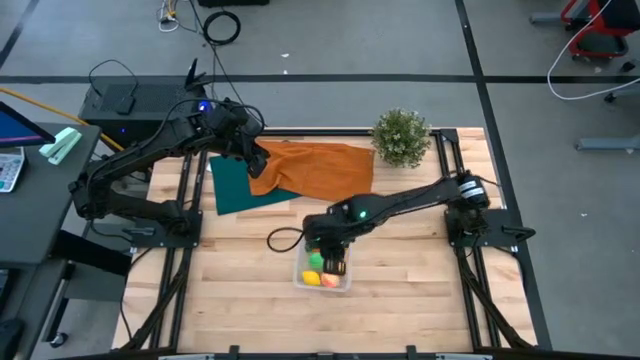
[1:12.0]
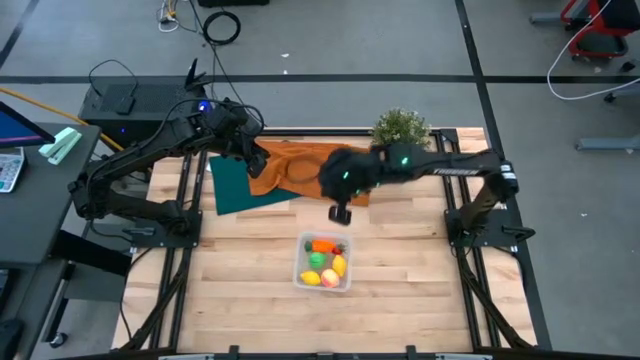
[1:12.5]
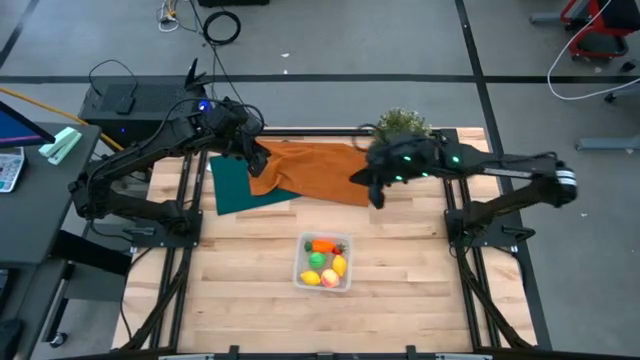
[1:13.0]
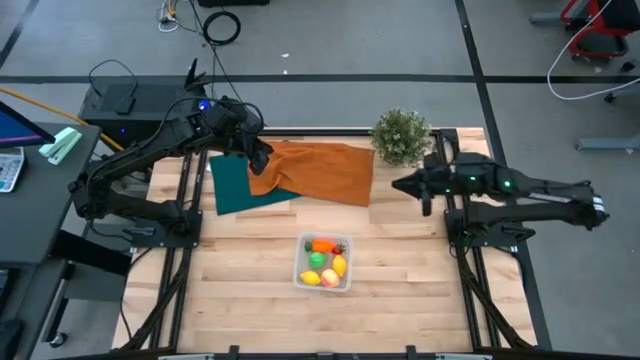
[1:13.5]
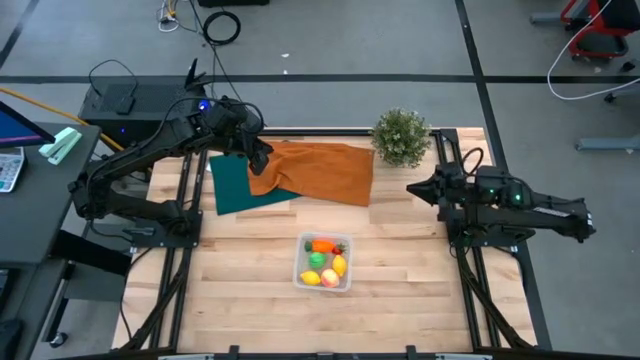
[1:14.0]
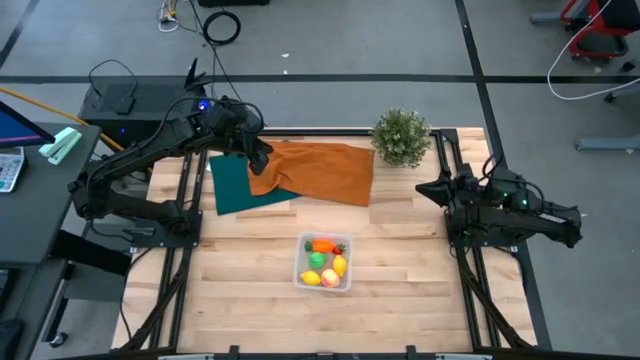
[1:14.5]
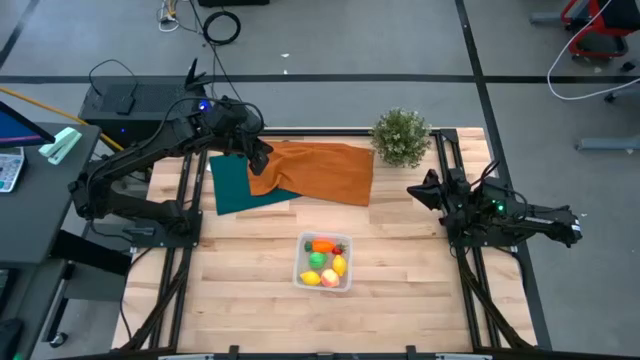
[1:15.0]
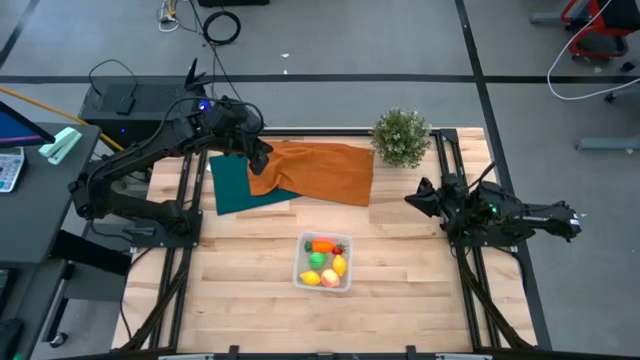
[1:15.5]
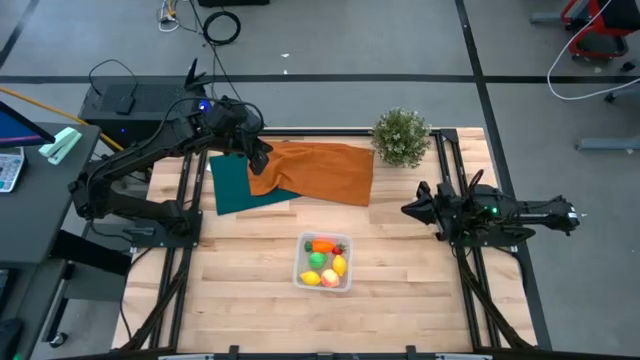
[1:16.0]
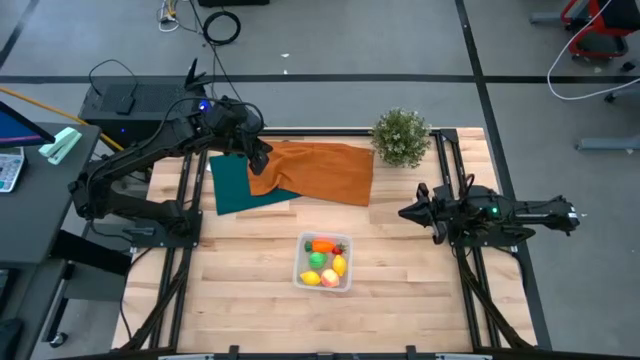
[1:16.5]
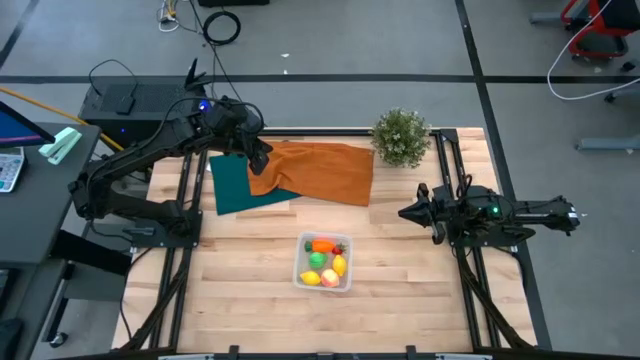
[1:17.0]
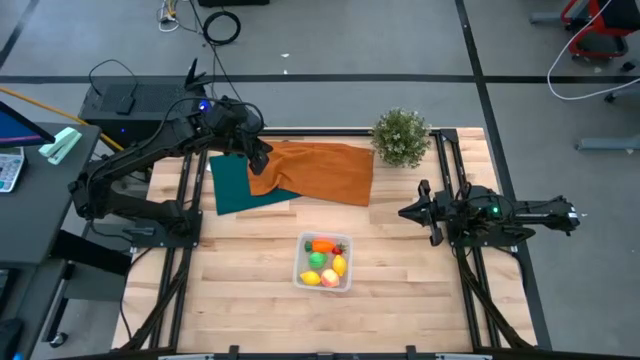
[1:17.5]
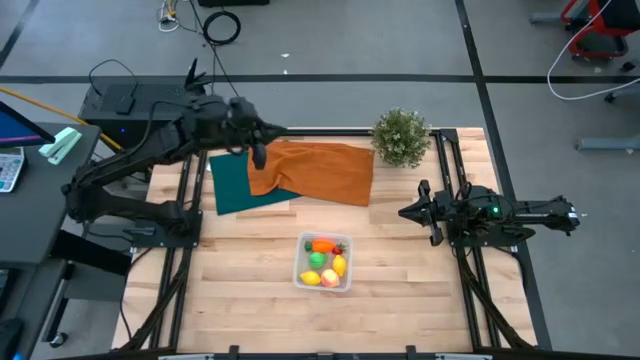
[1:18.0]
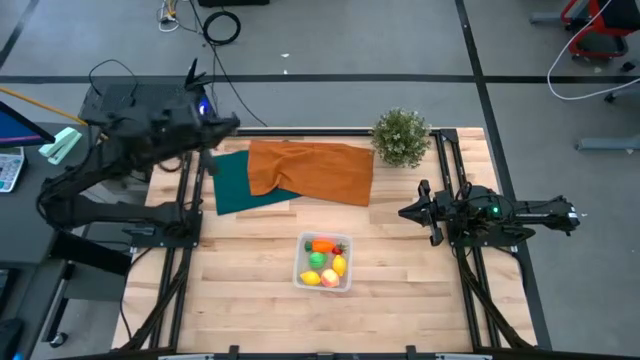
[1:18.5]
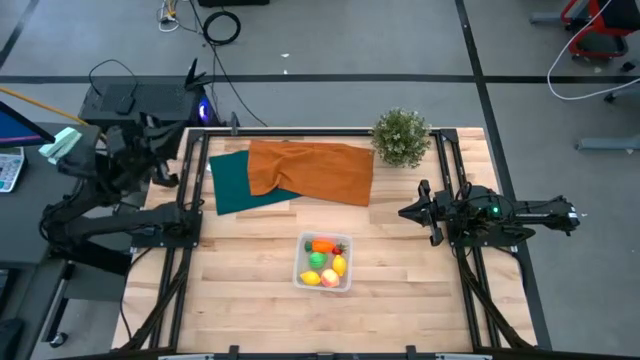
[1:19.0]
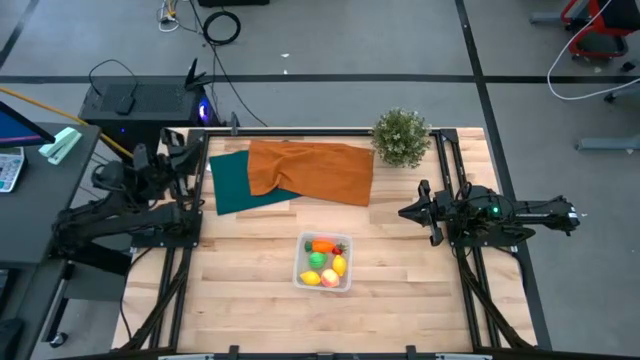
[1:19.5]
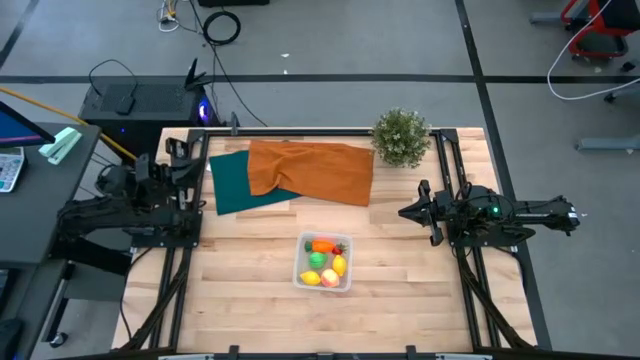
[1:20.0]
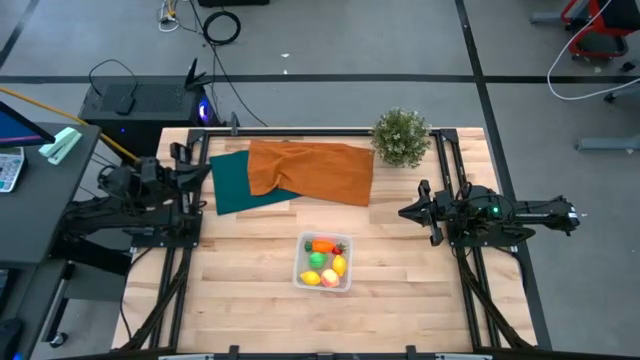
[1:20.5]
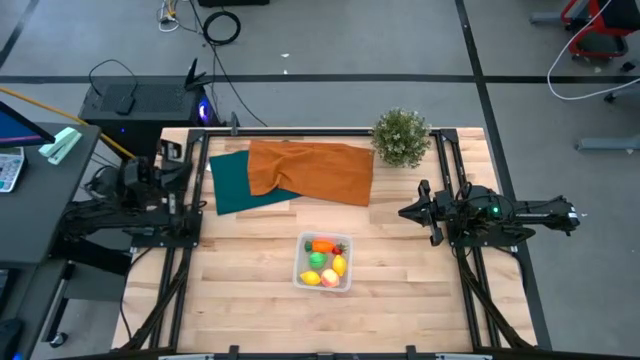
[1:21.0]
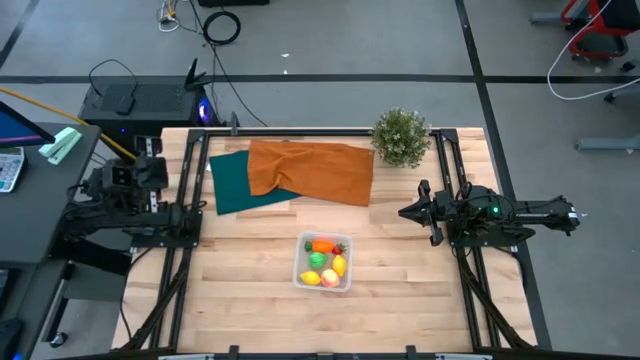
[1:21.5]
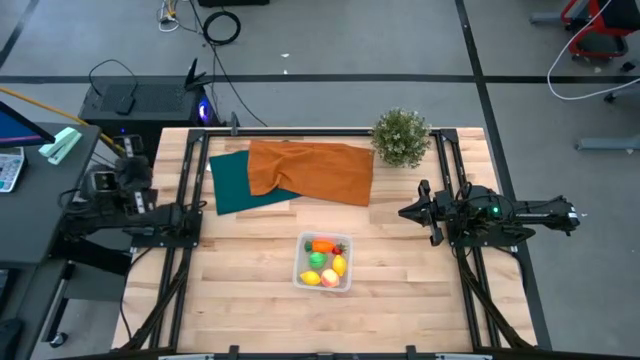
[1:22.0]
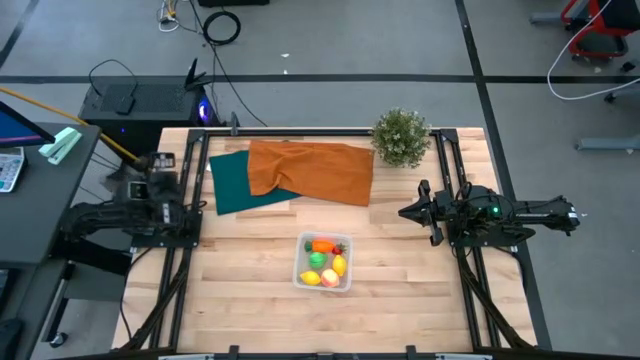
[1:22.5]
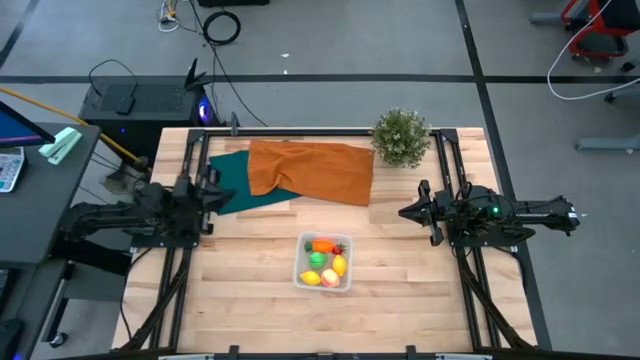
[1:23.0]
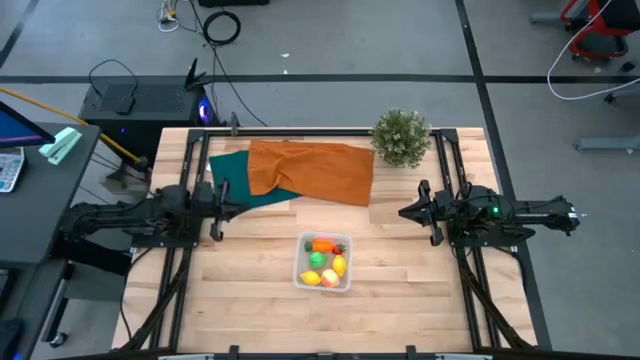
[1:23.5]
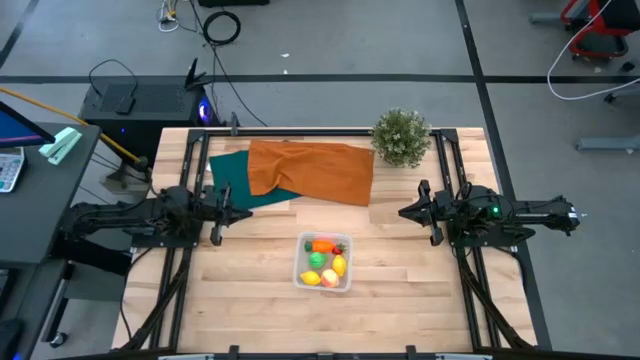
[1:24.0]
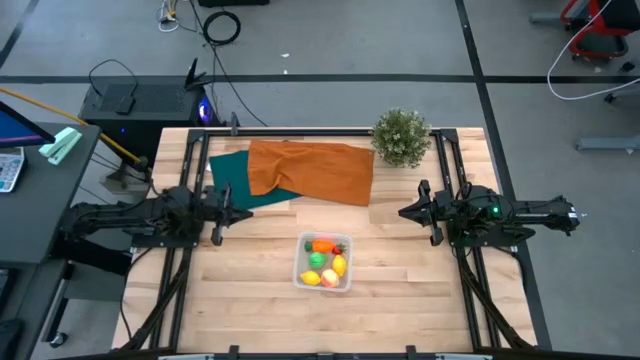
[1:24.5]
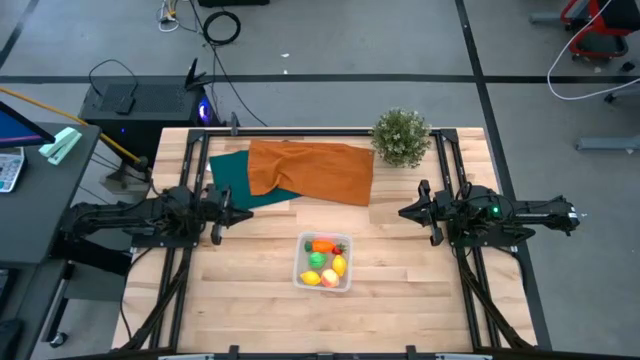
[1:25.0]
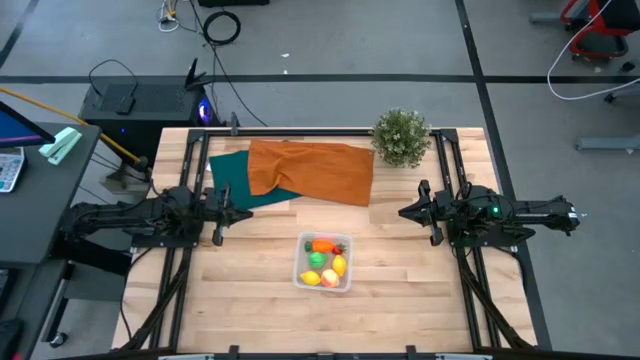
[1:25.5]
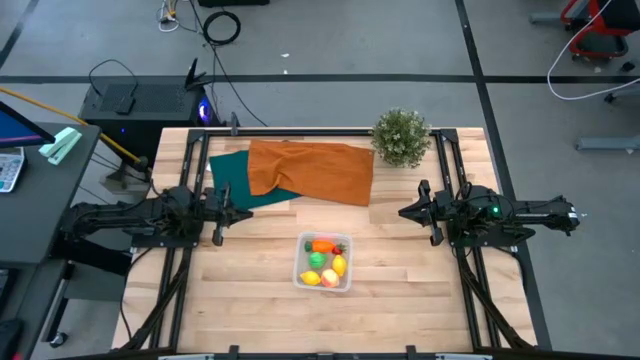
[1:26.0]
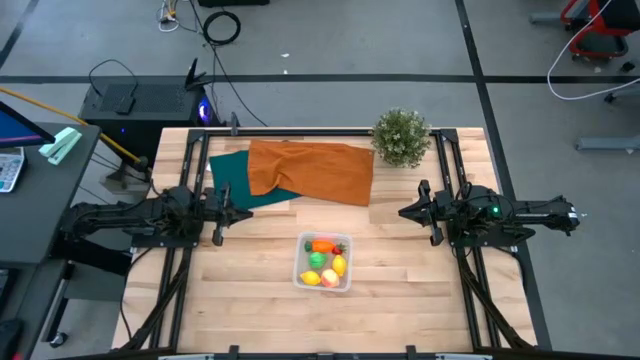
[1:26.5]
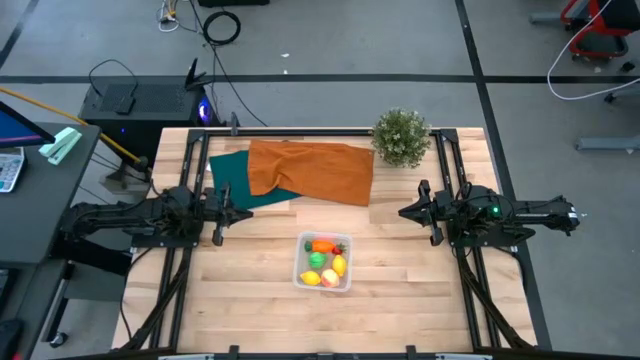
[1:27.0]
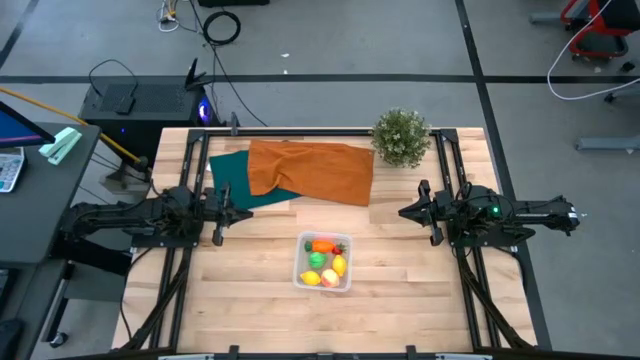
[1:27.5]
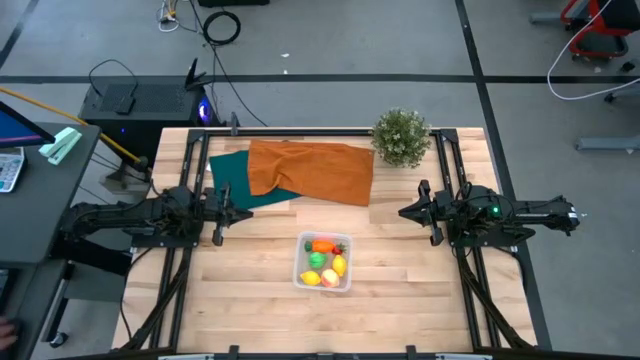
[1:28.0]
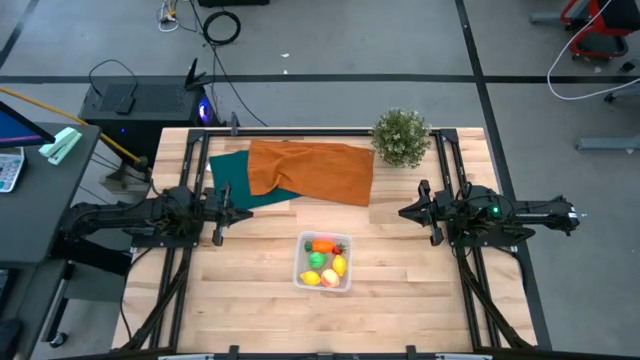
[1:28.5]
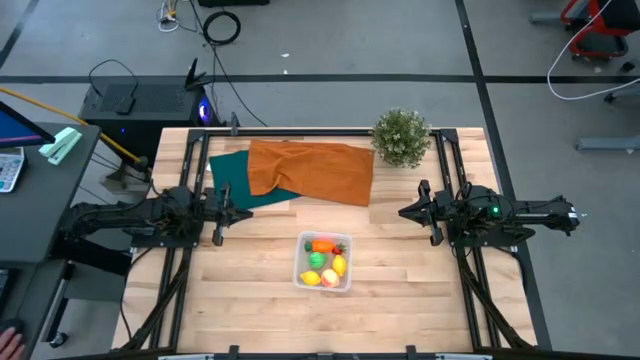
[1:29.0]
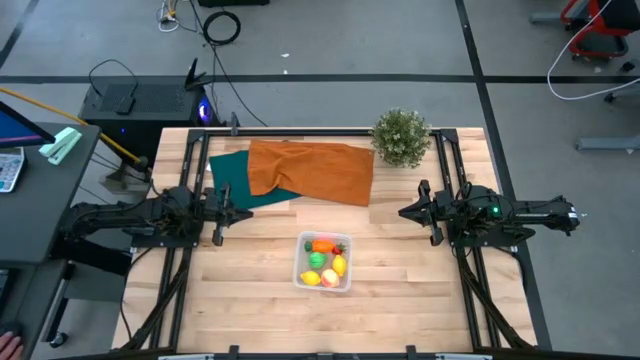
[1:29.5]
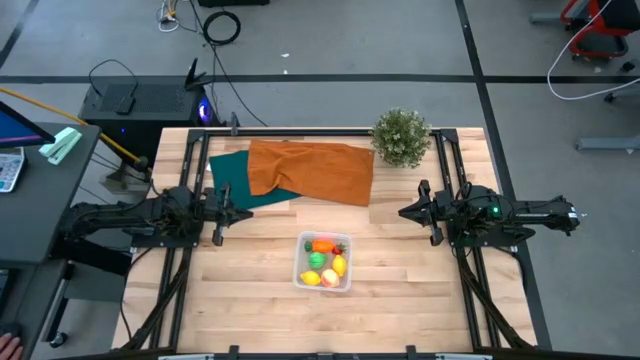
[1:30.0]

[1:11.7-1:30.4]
Task: Pick and placing Produce into tupperware
Return to Home Position

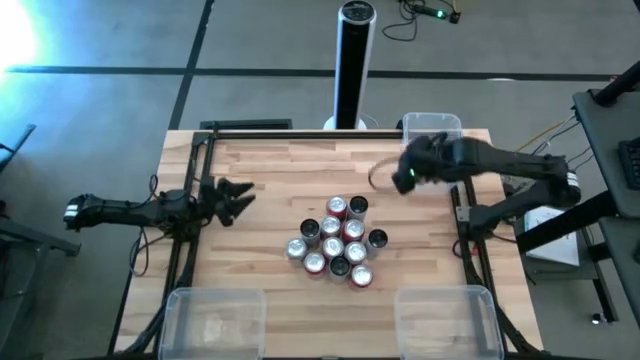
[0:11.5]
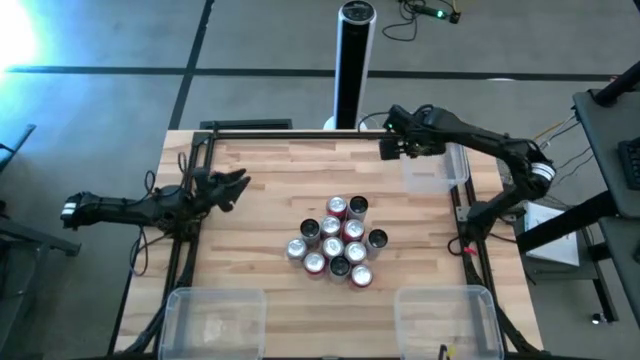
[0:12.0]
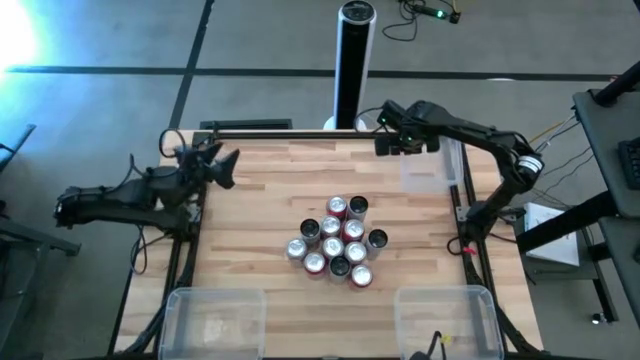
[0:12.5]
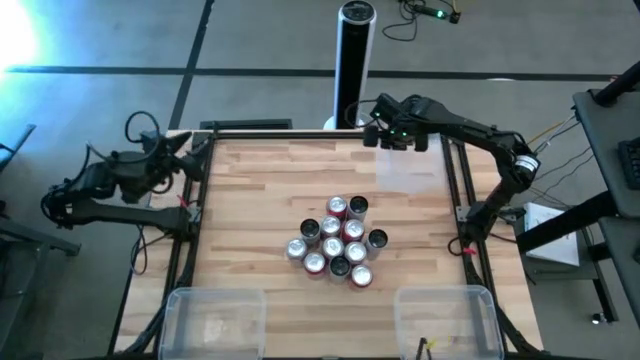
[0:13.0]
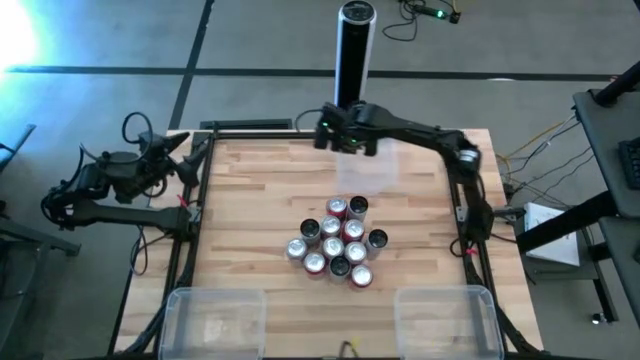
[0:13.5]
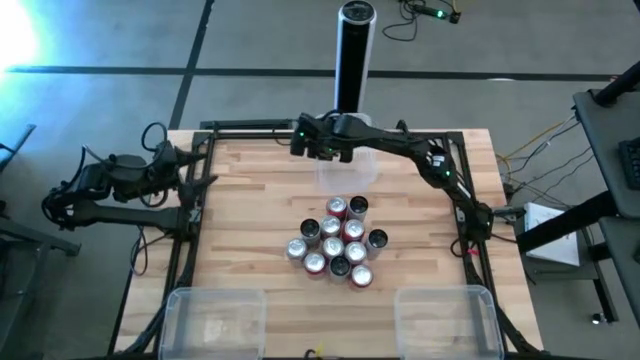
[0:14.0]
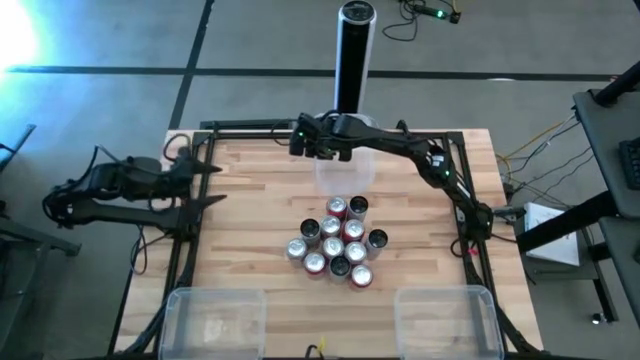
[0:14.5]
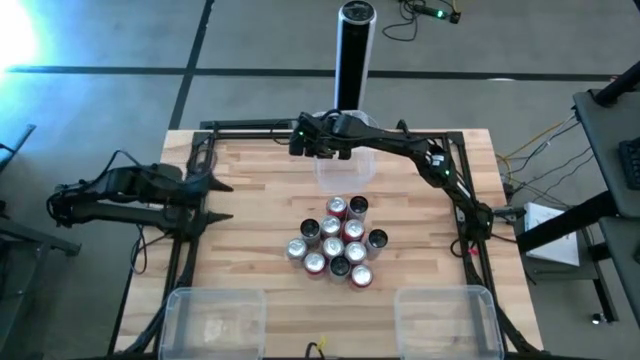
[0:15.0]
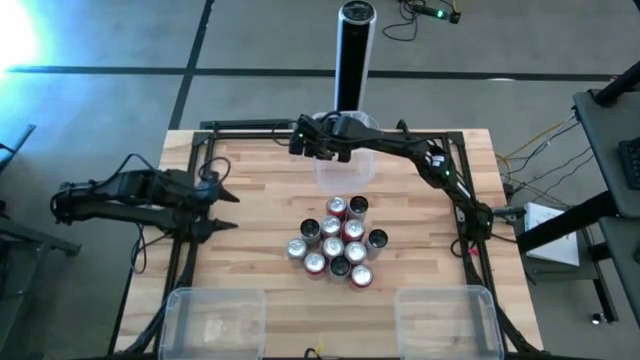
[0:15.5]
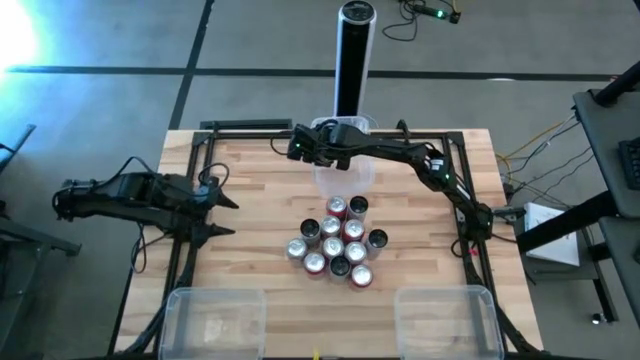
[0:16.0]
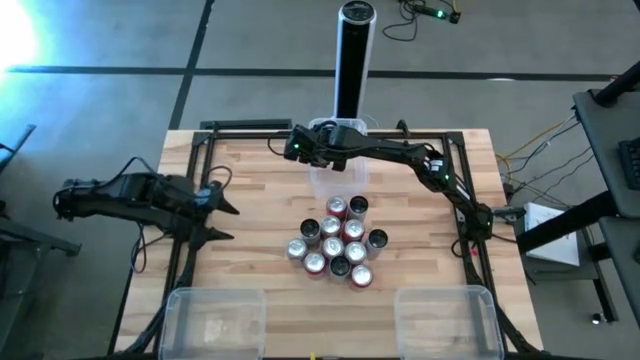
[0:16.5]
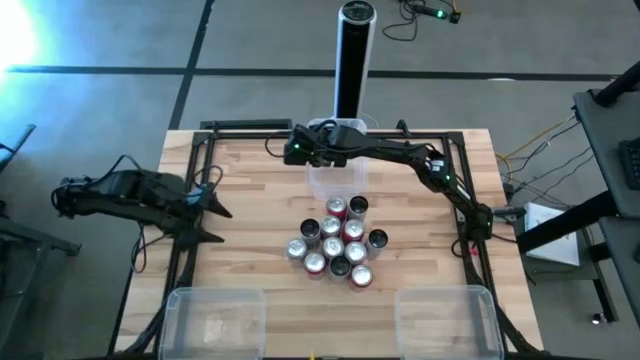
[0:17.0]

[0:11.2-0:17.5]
Task: Sort soda cans
Move the top right white bin to the center of the table
